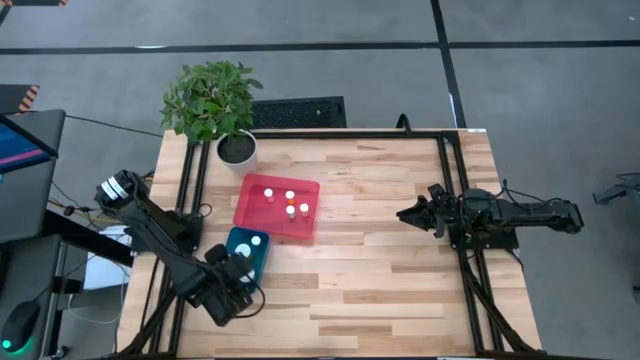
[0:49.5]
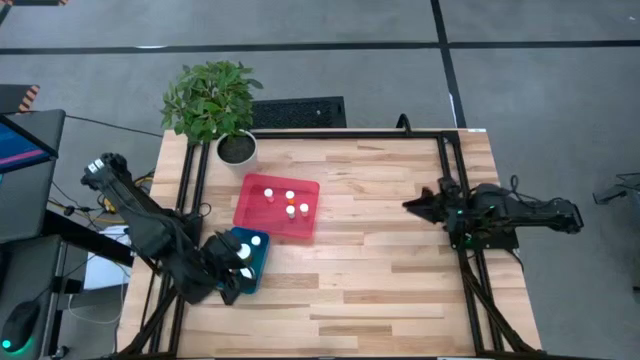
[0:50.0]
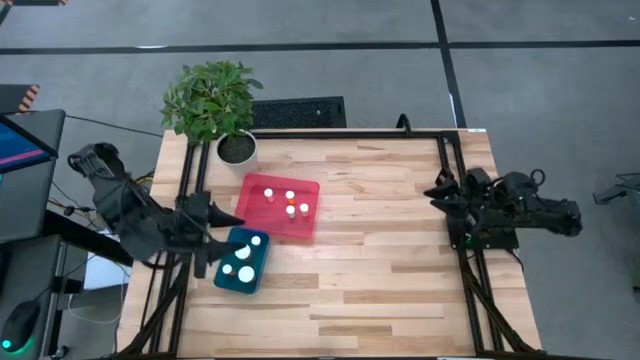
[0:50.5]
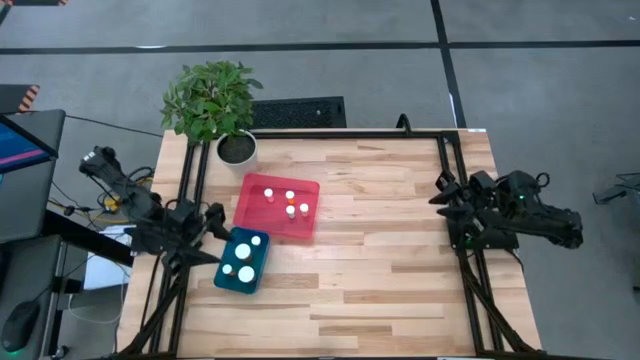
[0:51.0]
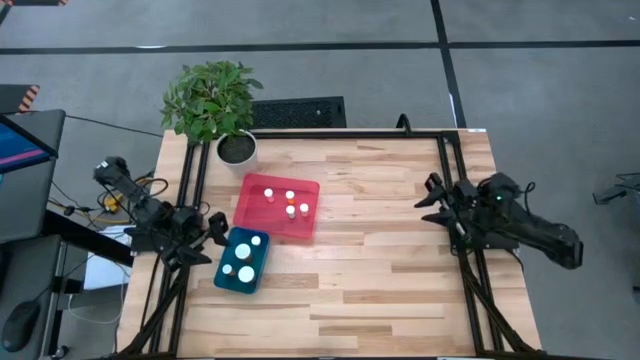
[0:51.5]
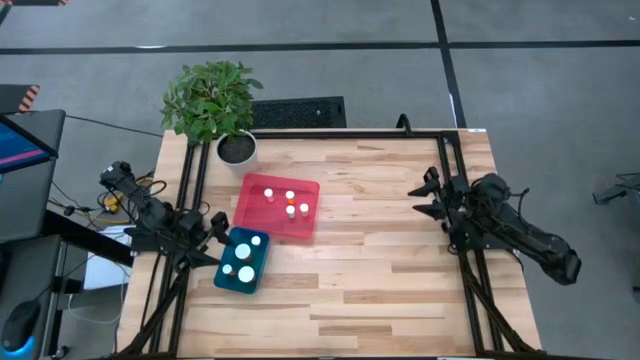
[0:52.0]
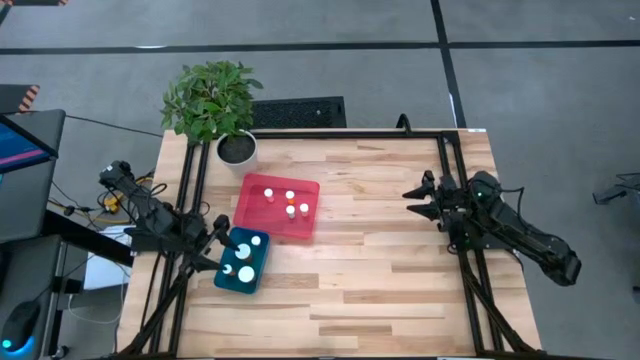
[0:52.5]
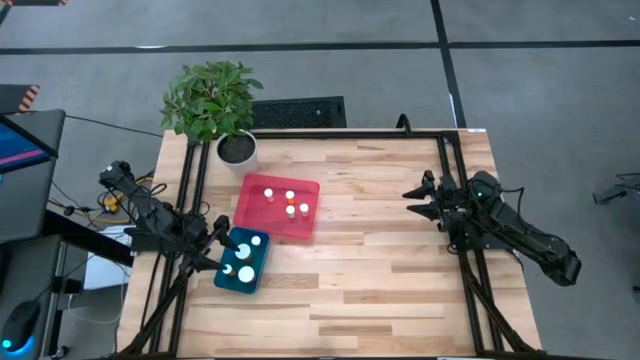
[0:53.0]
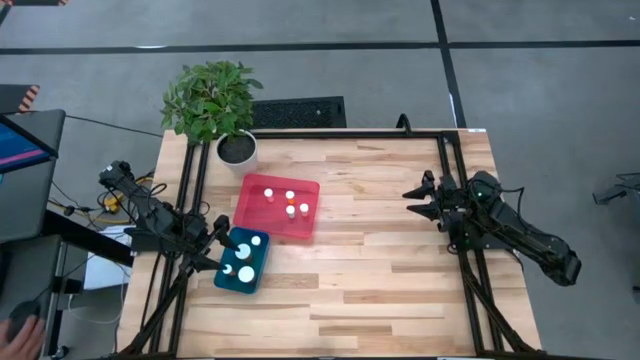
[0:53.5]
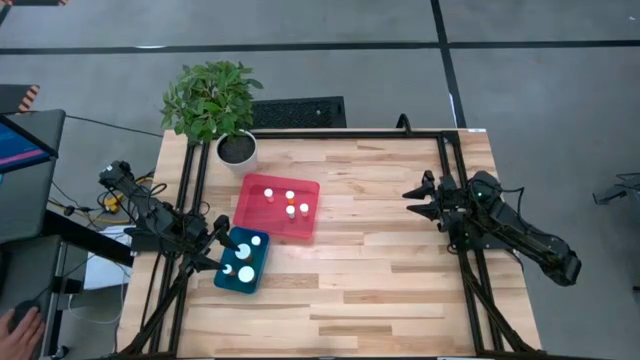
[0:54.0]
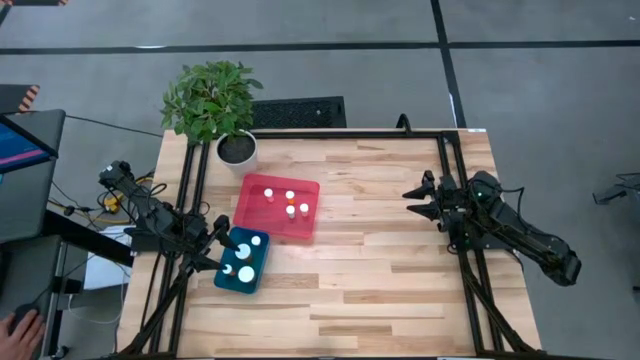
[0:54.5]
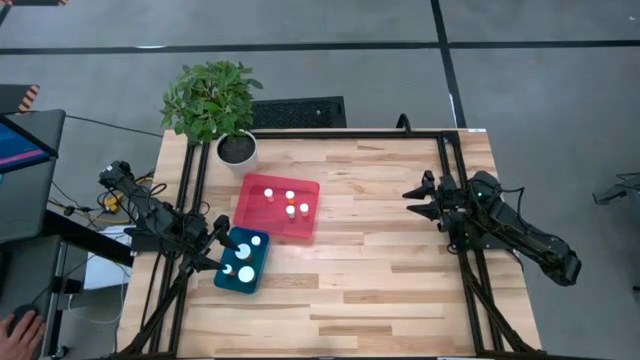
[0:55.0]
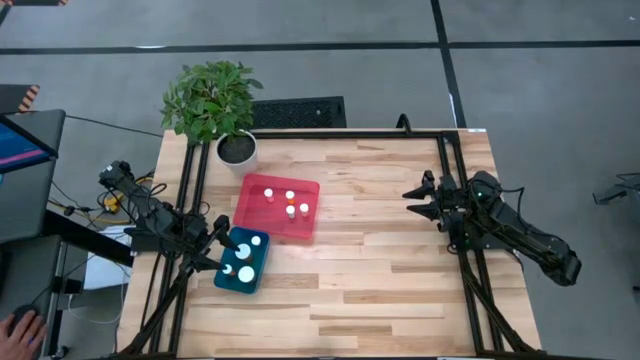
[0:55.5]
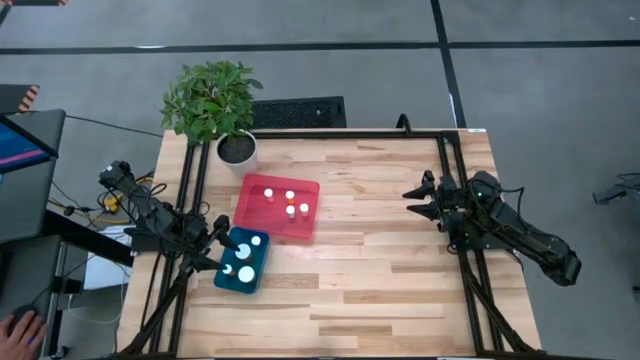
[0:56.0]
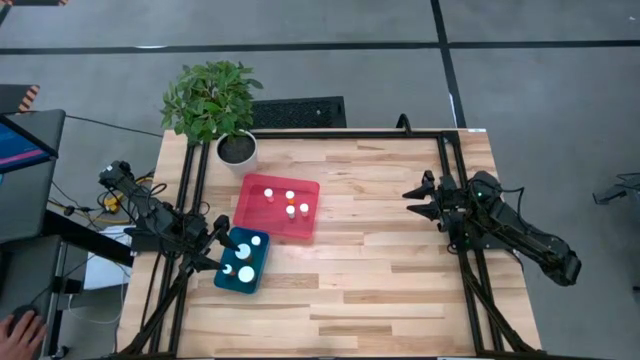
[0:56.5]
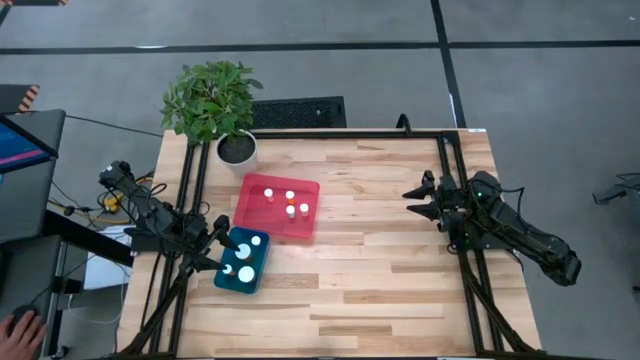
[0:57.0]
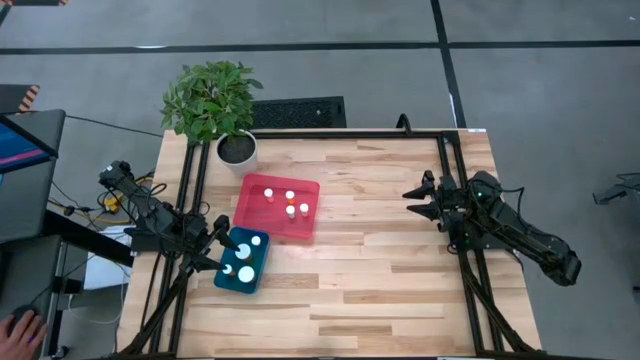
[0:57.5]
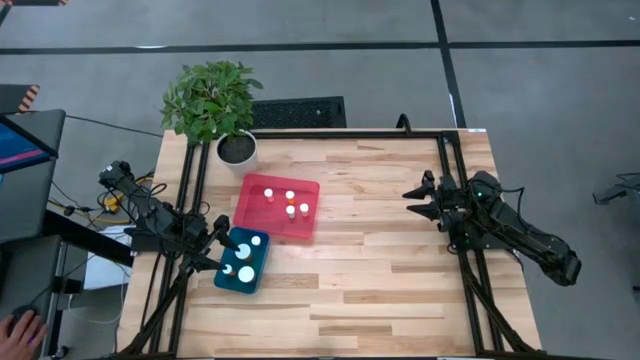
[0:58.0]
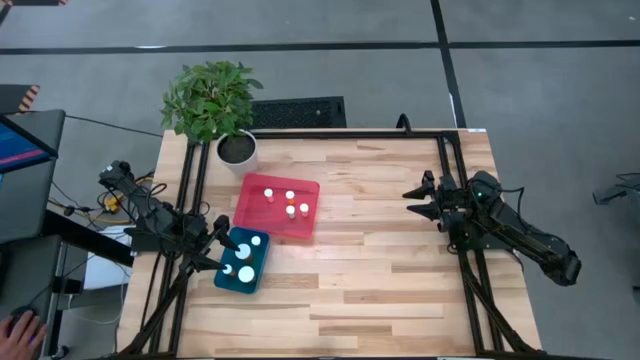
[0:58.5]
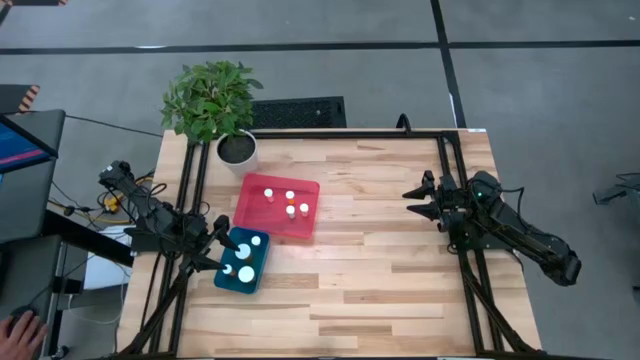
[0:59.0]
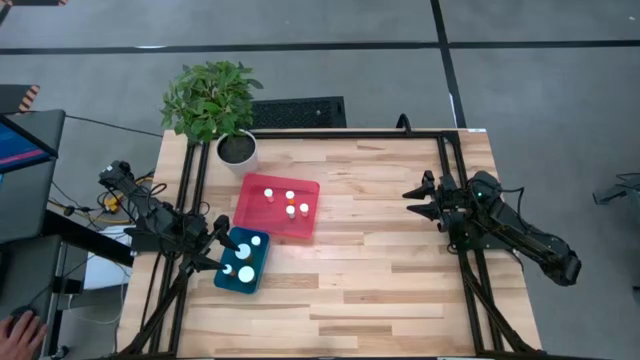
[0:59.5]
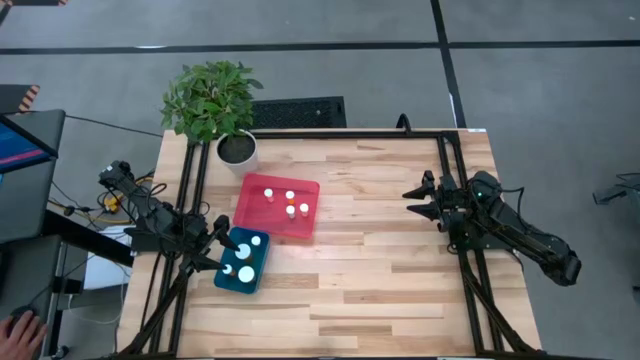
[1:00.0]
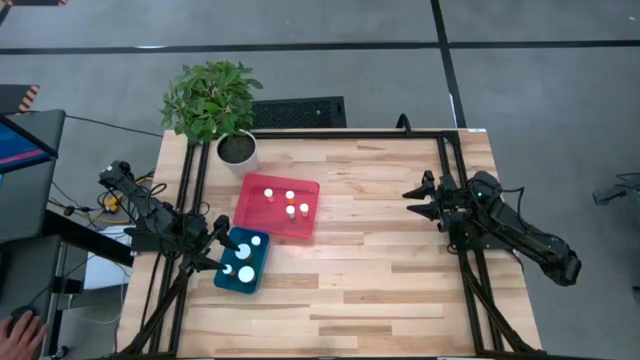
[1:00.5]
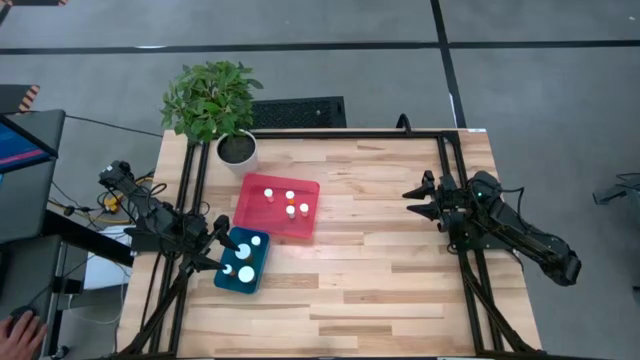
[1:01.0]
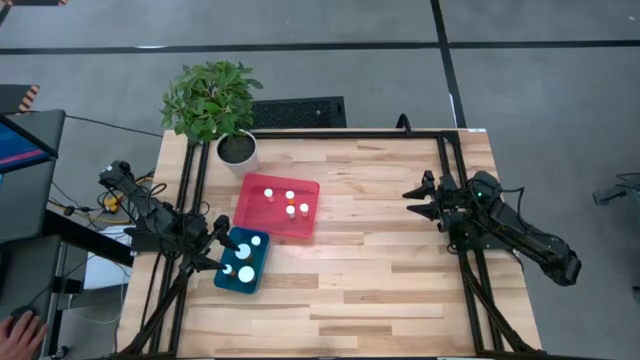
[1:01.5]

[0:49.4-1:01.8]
Task: Pick and place medicine bottles into bin by pill shape (circle, oval)
Return to Home Position

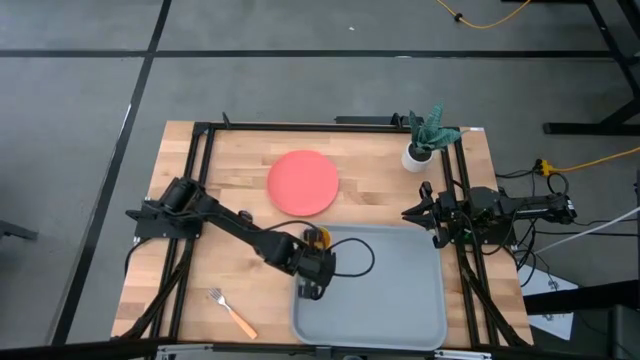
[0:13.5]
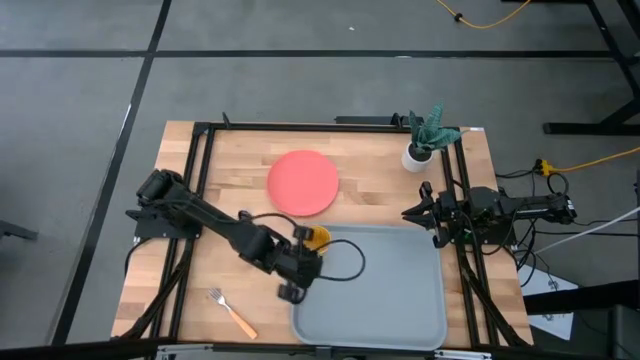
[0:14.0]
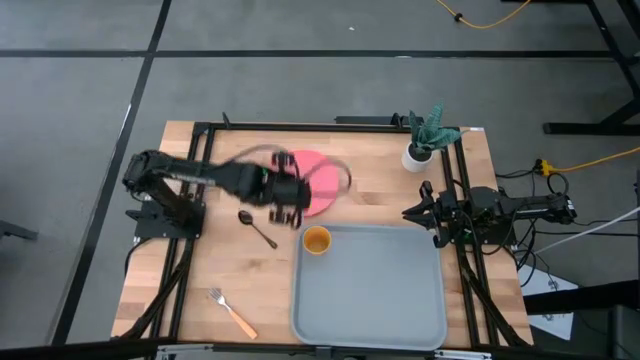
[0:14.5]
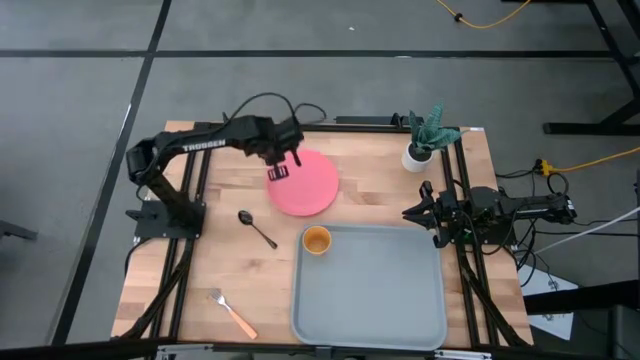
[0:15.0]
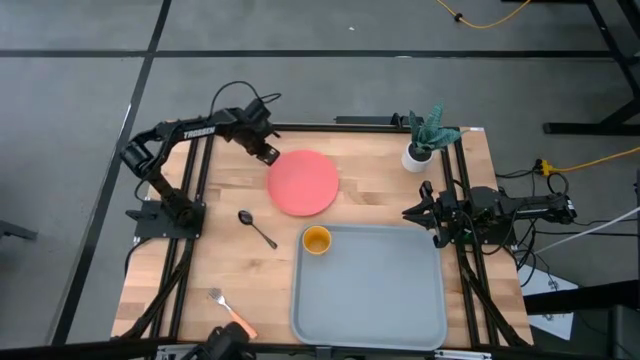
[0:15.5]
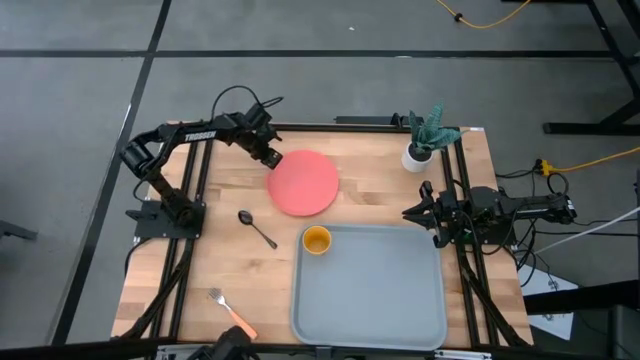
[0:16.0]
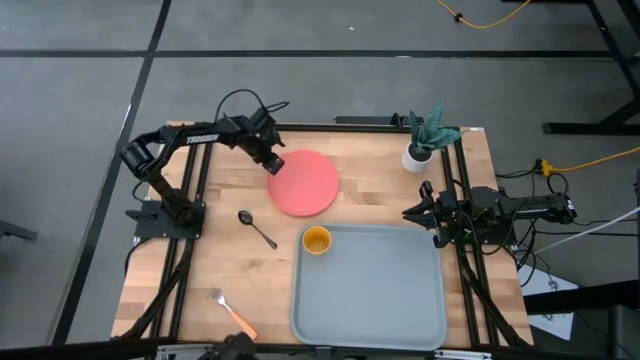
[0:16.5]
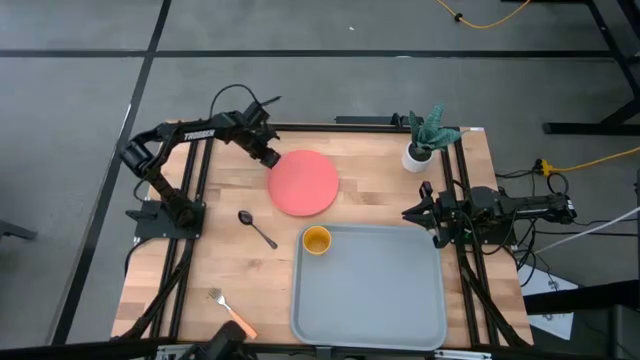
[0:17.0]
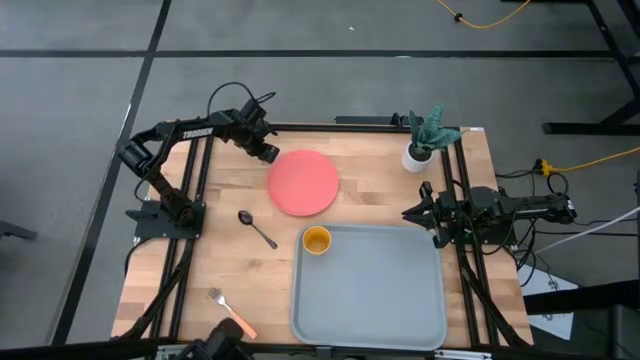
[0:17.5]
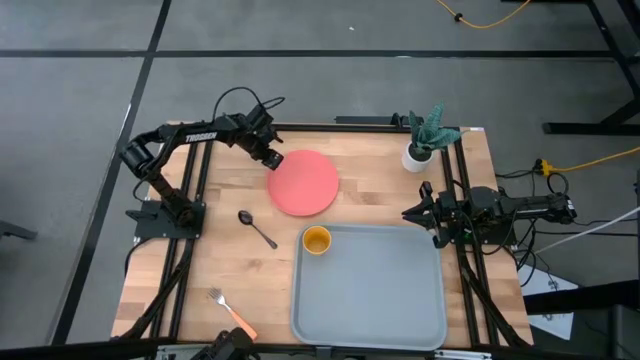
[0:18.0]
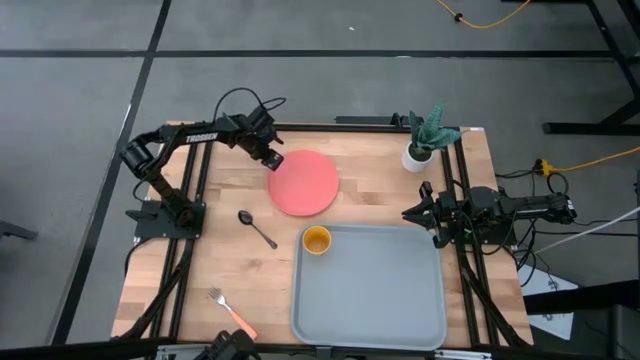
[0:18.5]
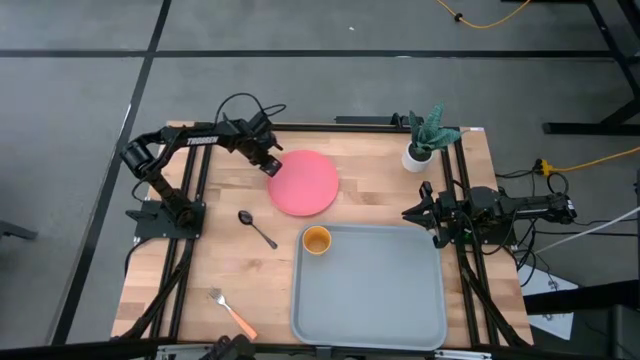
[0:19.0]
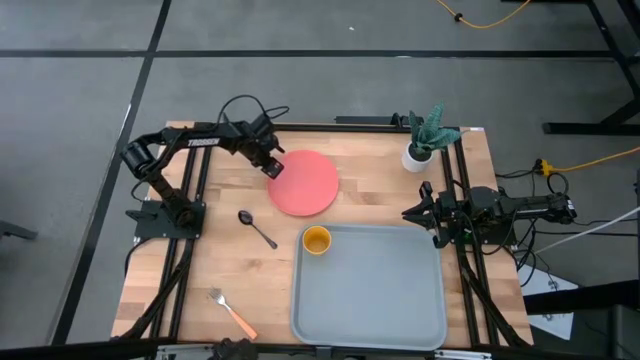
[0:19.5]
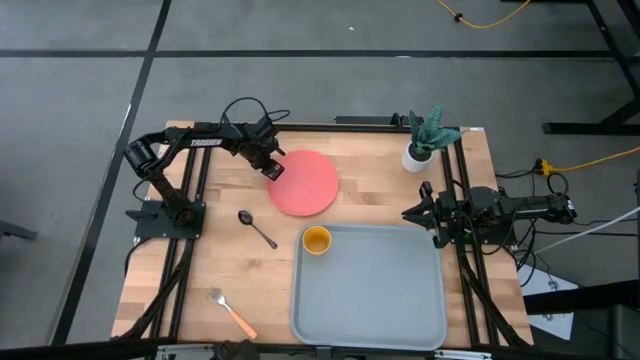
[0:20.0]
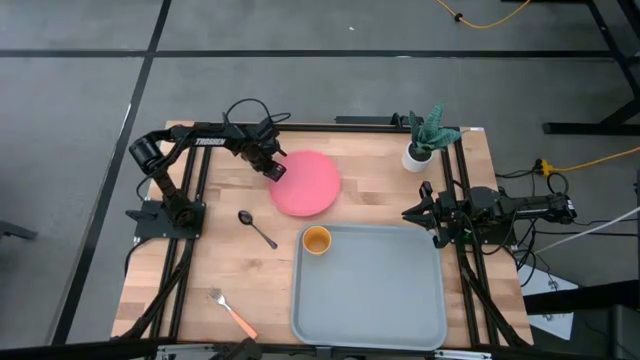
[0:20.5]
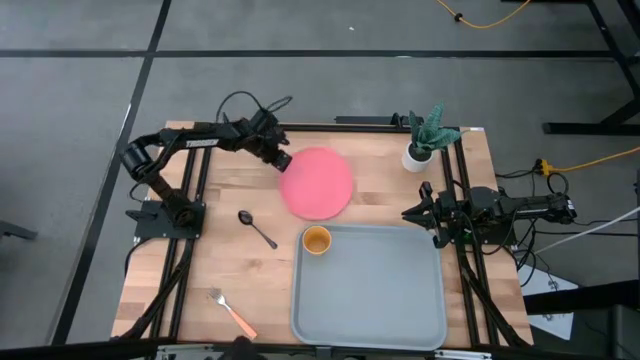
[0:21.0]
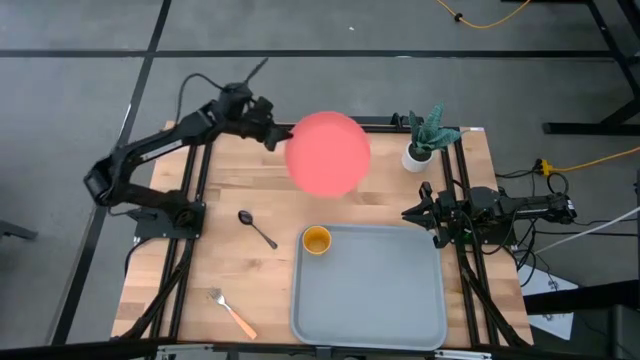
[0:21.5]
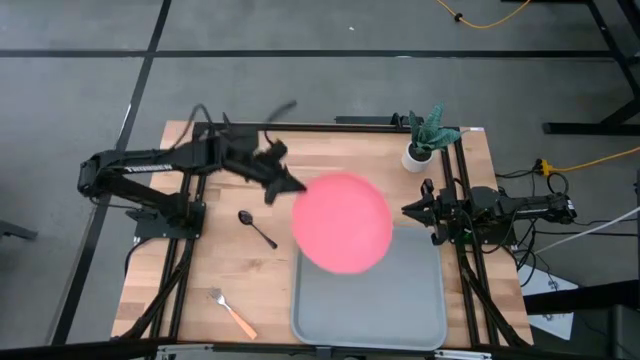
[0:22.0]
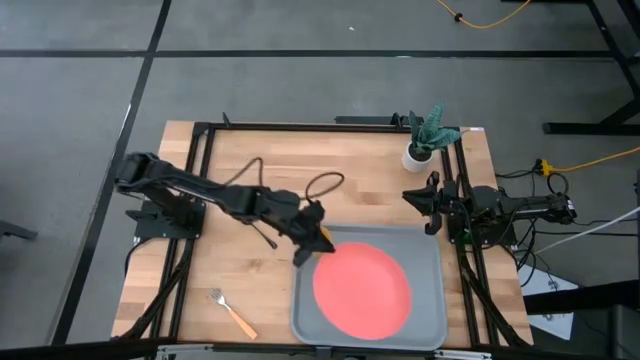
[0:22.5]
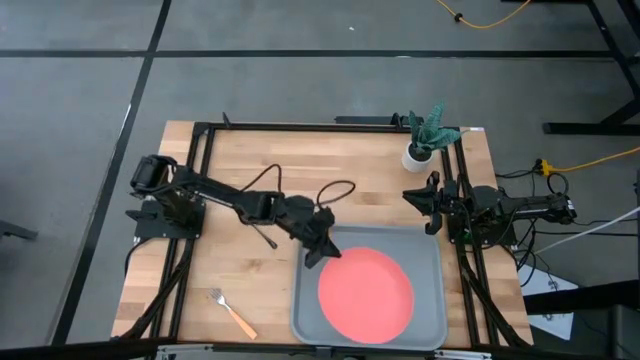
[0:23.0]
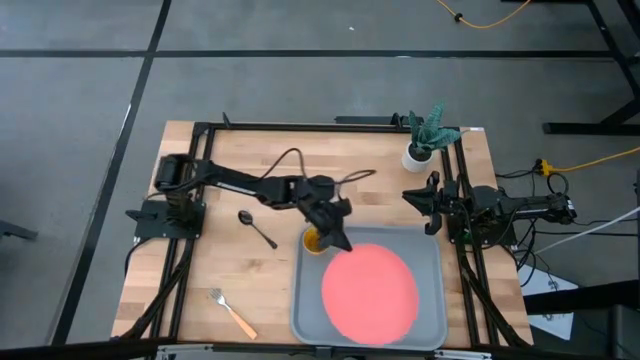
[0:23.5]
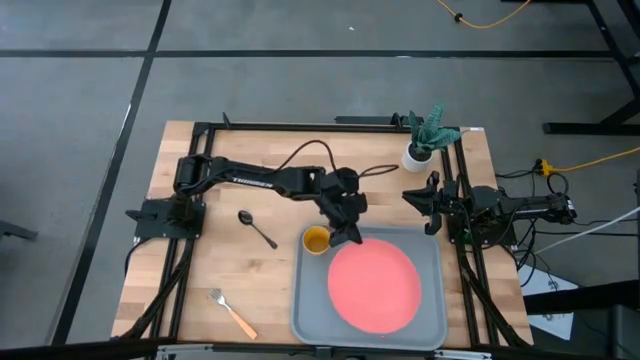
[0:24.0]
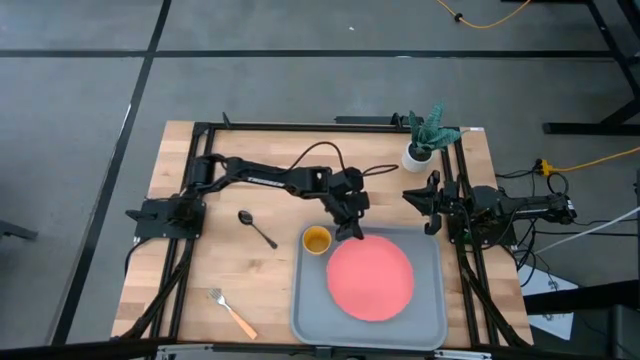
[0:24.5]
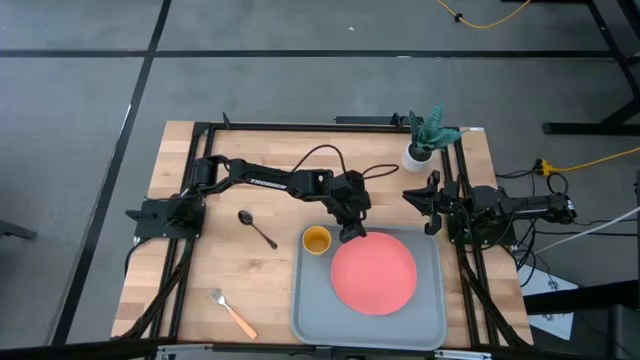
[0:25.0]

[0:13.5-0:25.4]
Task: Pick and place plate/cup/fork/spoon on tray
Put the pink plate on the light blue serving tray to the bottom right of the yellow cup
